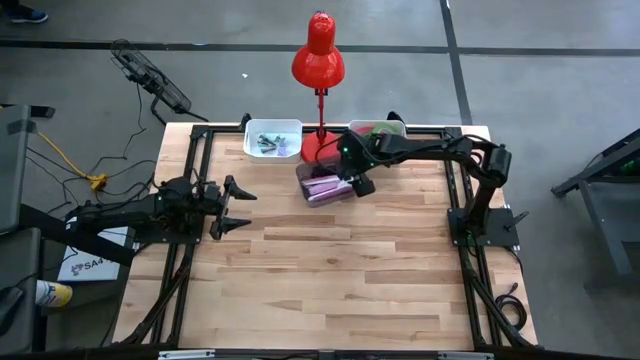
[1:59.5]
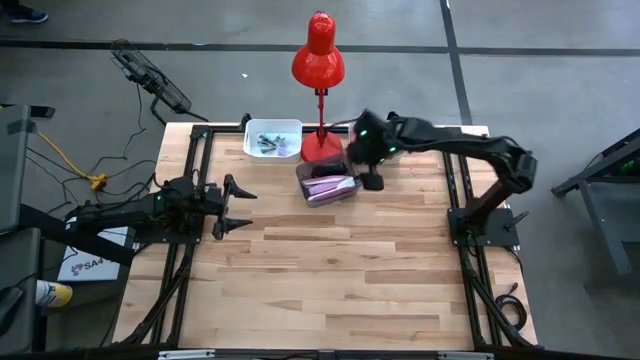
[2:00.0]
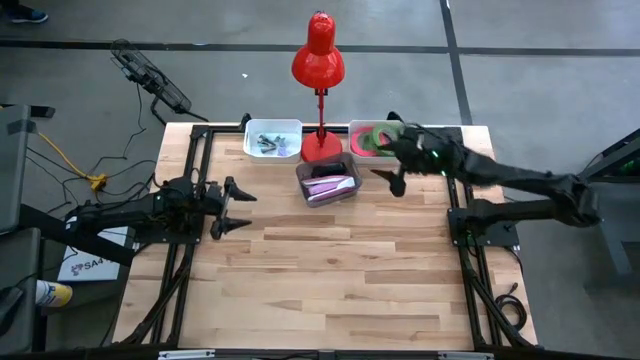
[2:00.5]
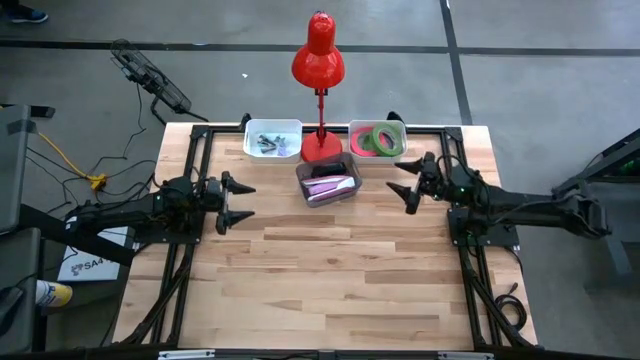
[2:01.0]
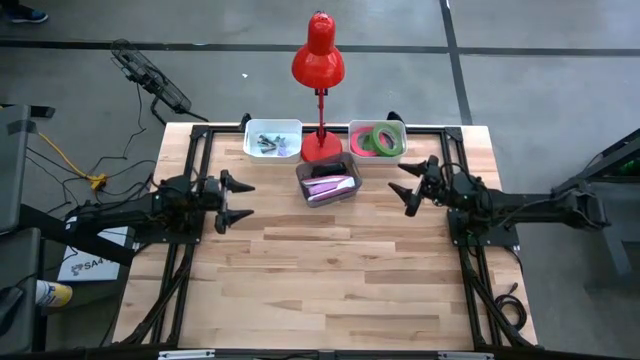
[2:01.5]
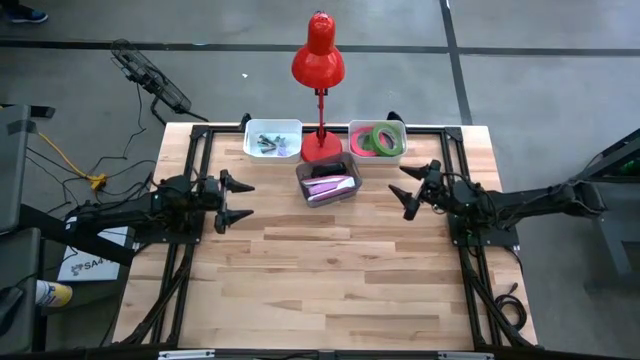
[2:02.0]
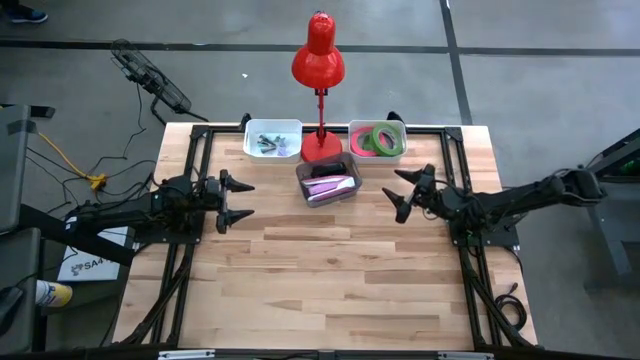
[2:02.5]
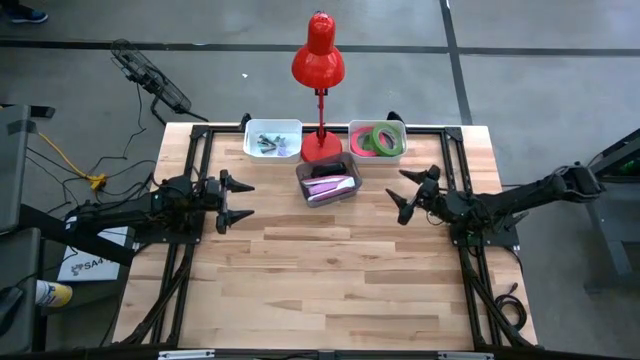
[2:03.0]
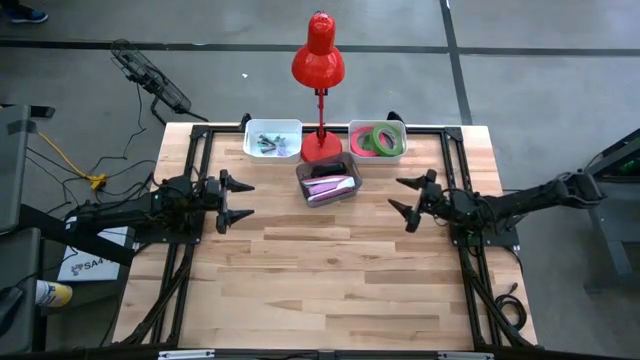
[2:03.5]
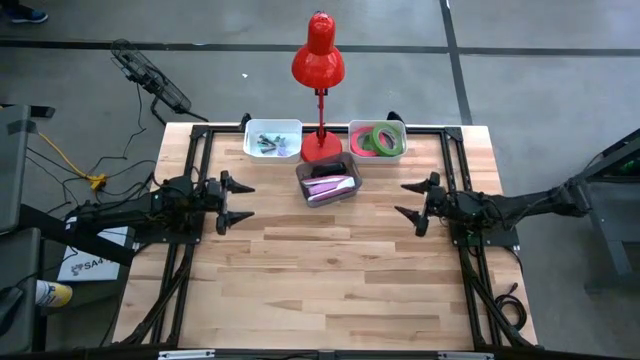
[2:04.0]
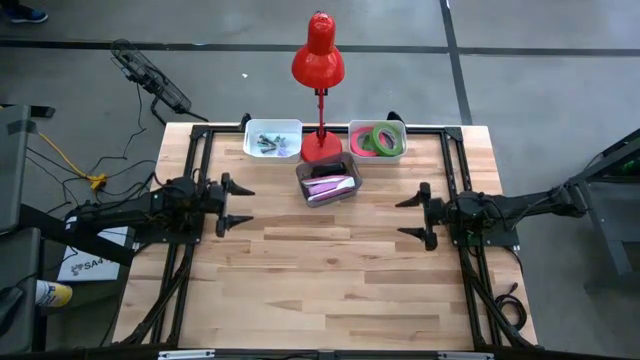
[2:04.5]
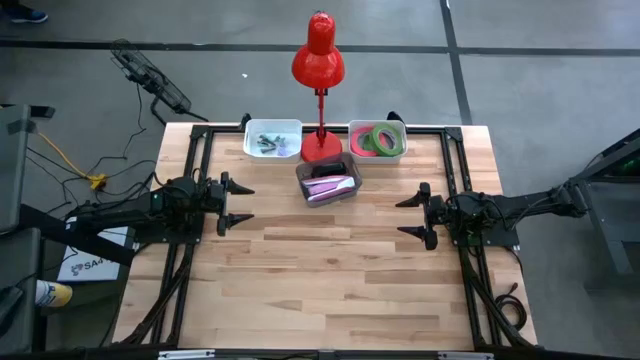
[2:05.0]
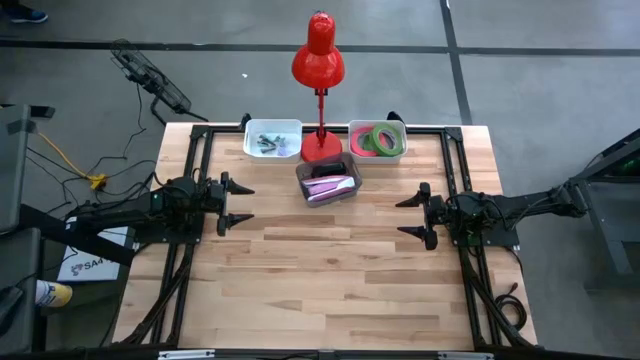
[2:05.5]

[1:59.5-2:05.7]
Task: Pick and place Stapler, Stapler remover, tape
Return to Home Position

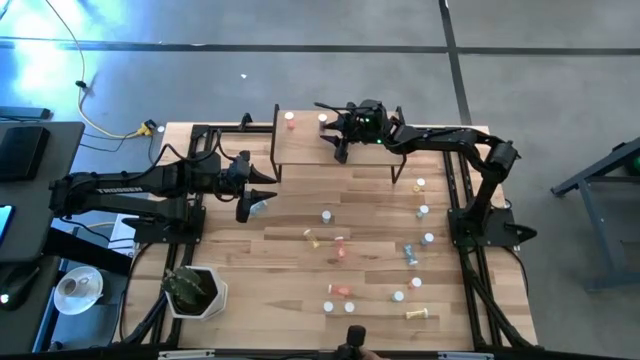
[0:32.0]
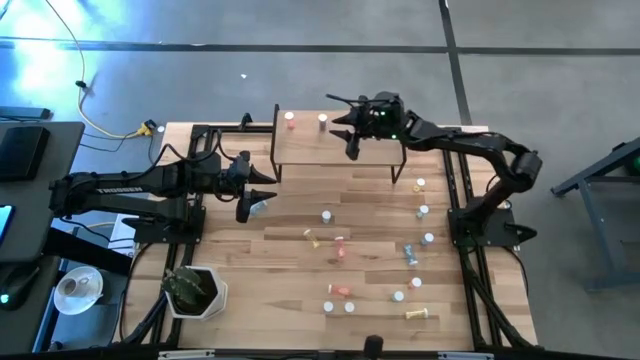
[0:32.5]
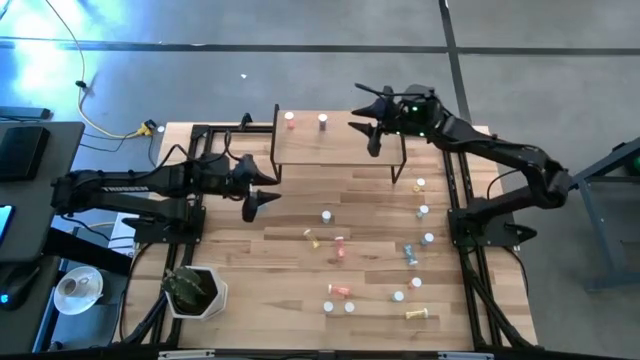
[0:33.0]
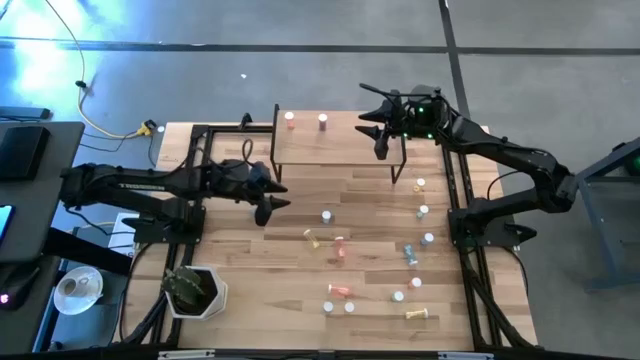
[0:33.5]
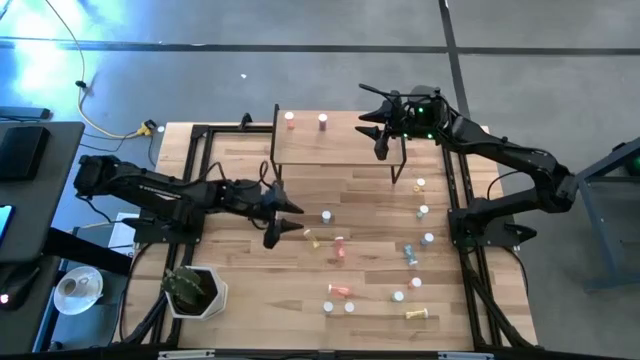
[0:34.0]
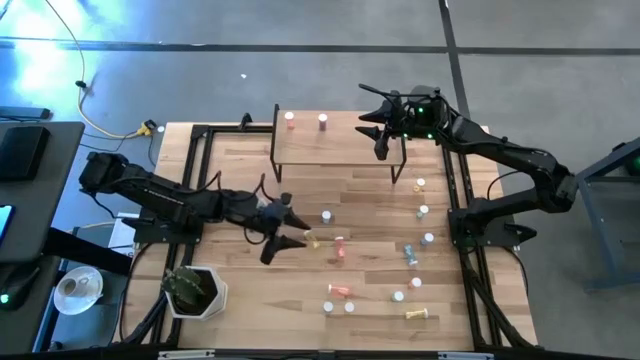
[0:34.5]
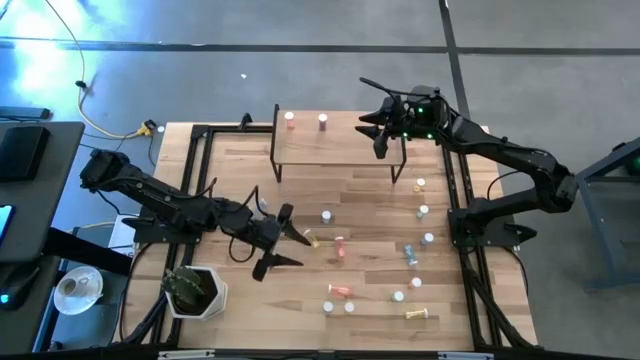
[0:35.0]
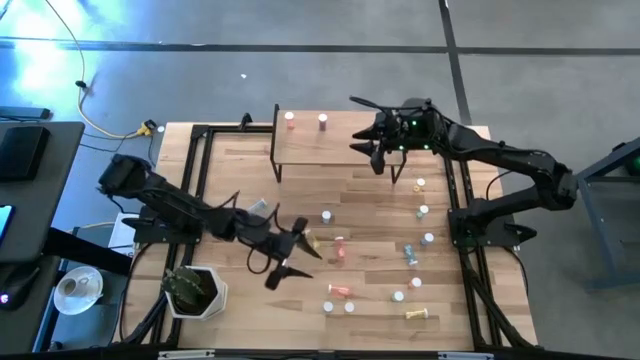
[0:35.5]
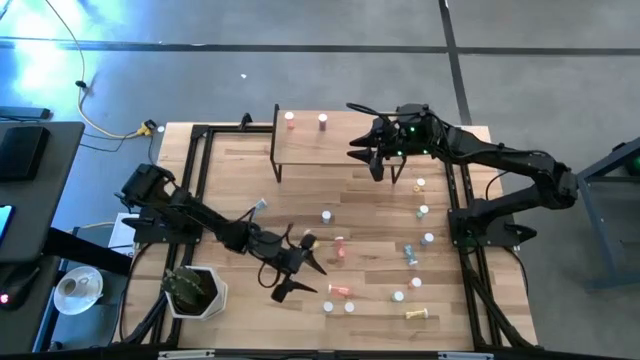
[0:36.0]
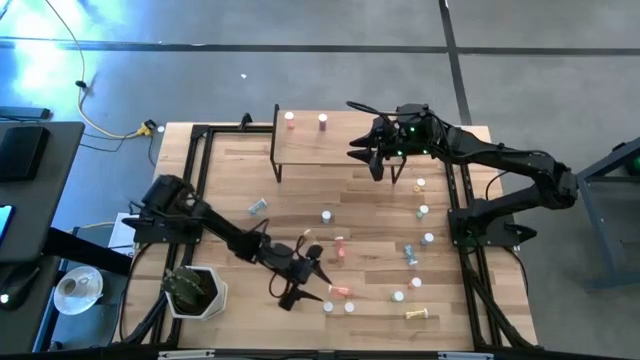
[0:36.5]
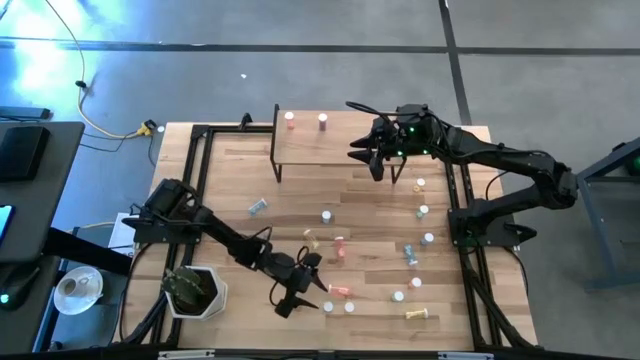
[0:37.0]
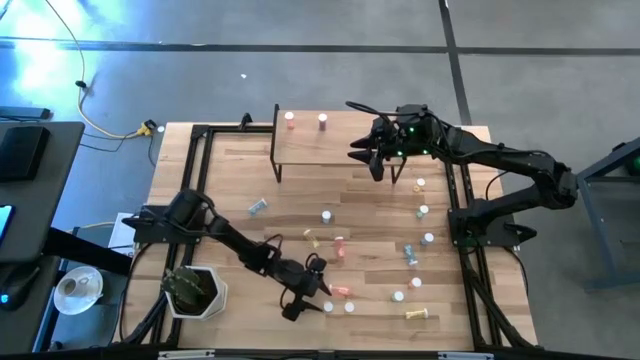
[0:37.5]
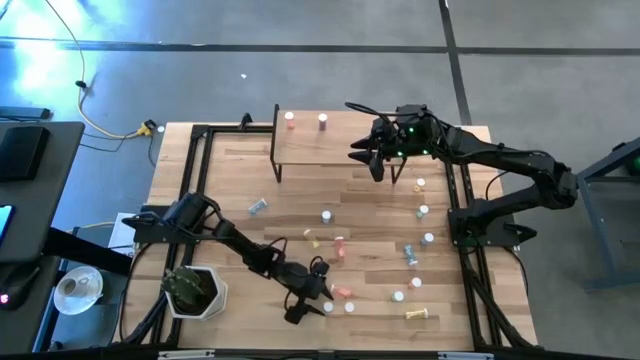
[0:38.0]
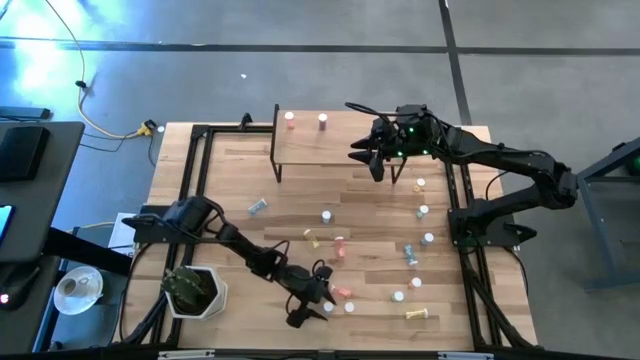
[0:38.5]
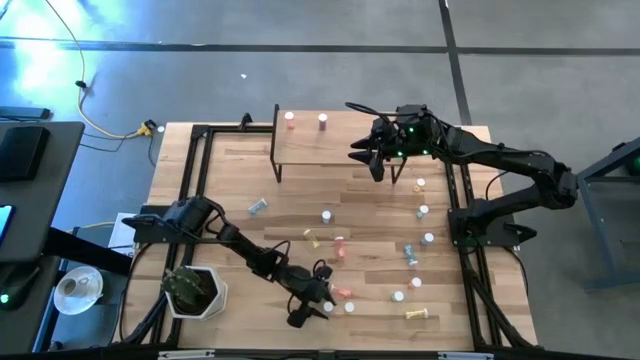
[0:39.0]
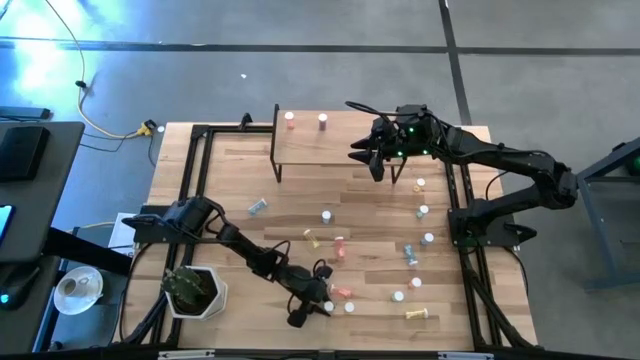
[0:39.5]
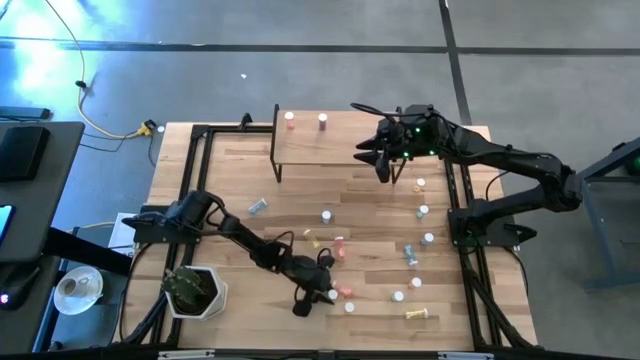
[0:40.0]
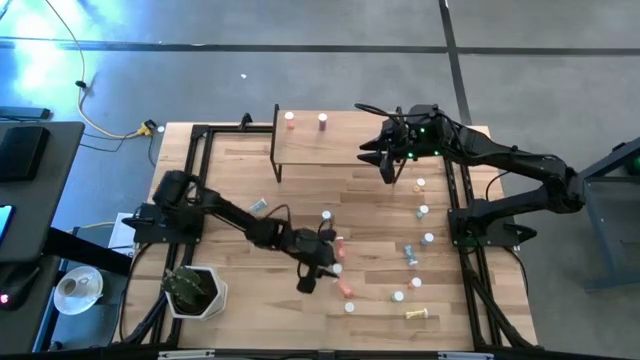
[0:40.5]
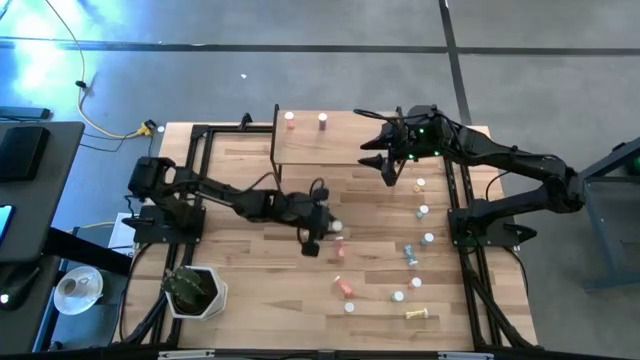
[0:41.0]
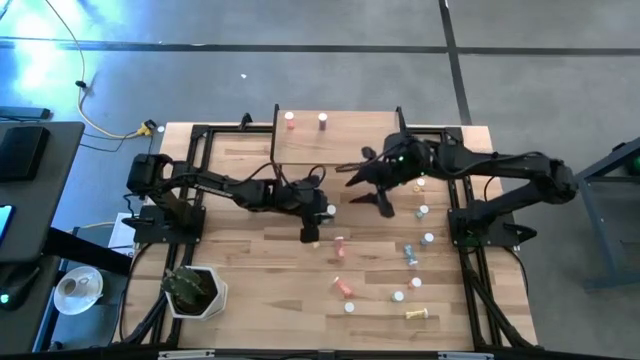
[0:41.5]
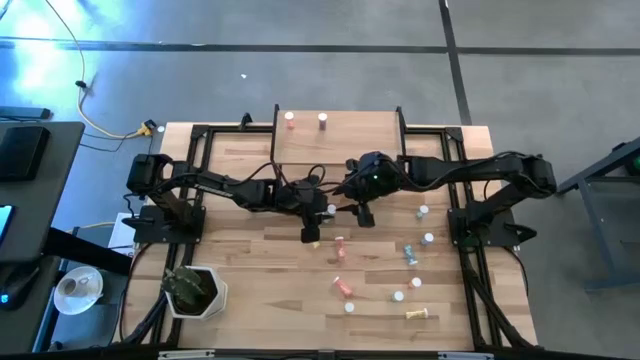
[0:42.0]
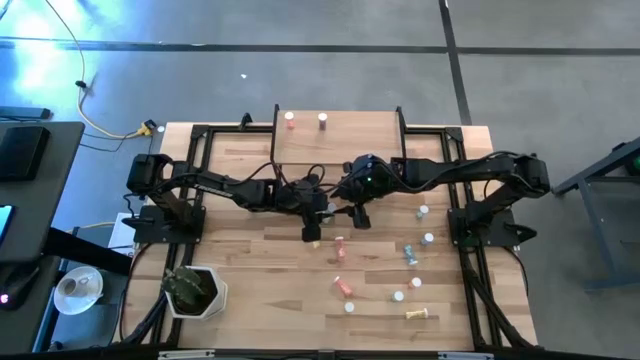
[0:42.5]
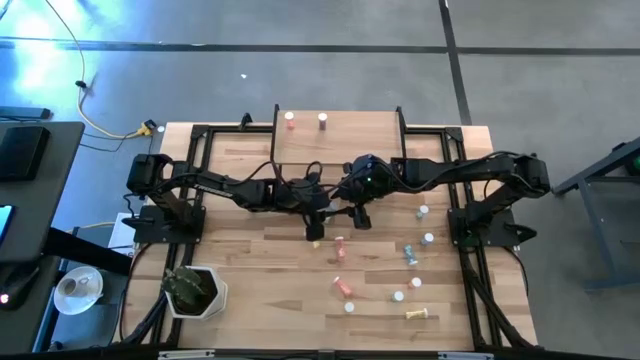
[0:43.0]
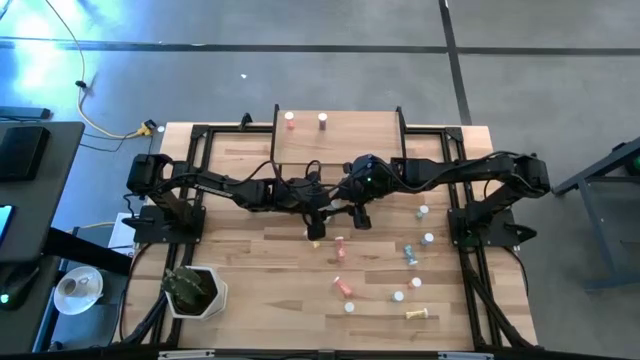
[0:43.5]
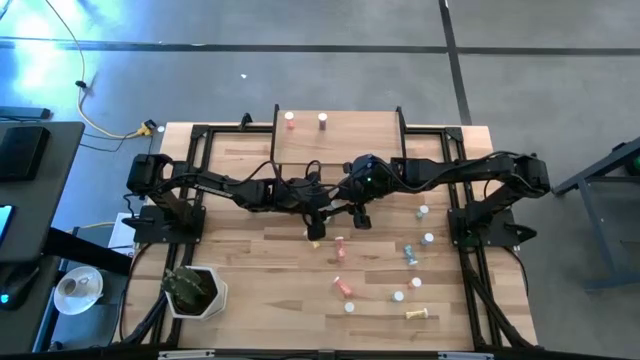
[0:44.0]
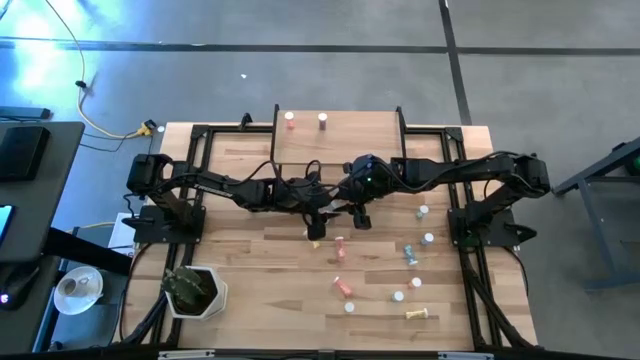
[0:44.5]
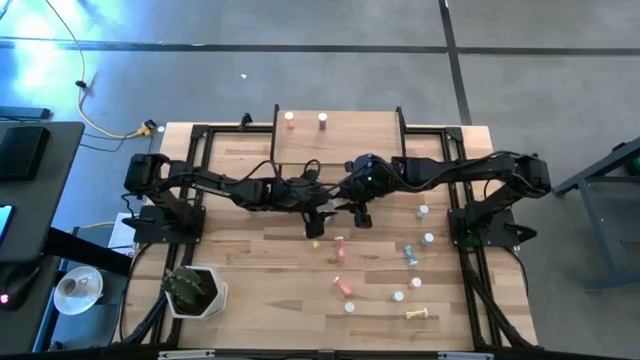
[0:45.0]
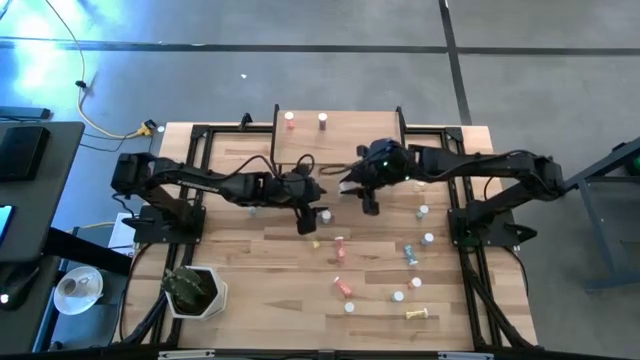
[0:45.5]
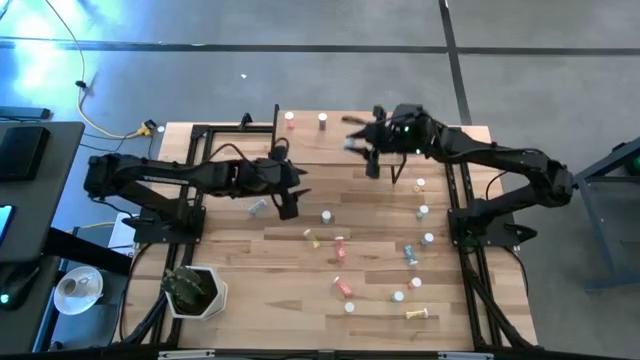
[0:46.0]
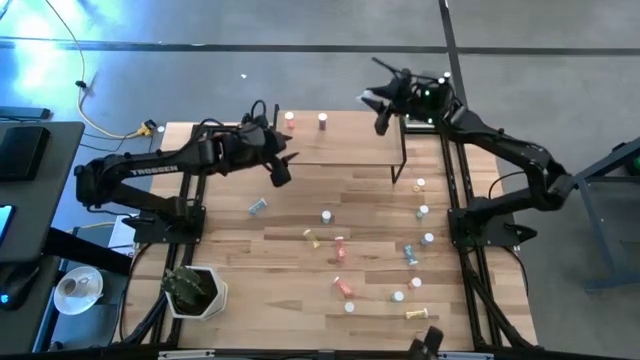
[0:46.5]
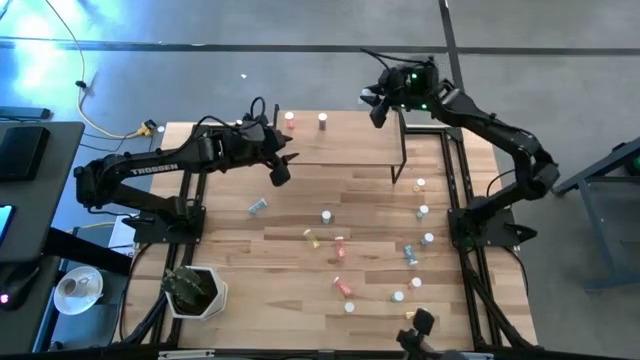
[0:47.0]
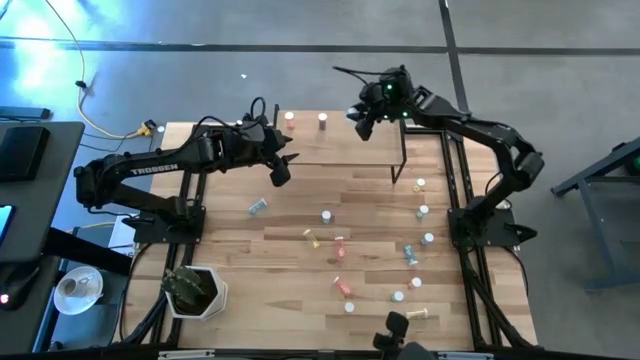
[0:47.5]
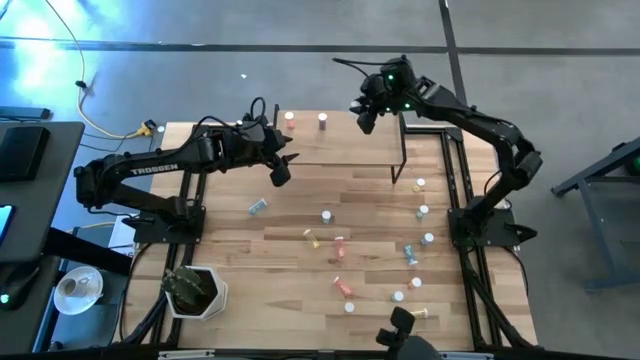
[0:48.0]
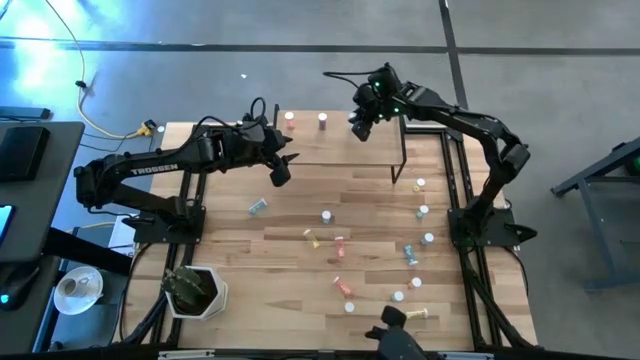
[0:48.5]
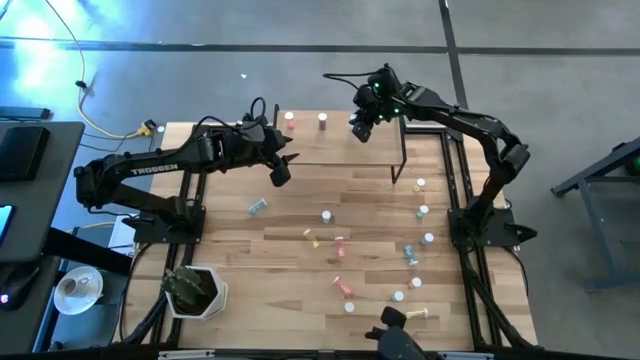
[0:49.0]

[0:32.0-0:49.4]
Task: Pick and place medicine bottles onto shelf by color
Put the green pill bottle on the shelf
